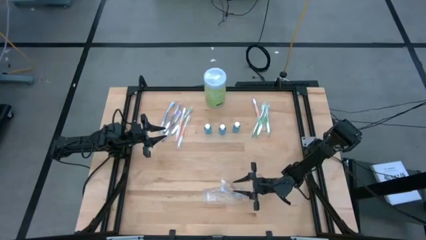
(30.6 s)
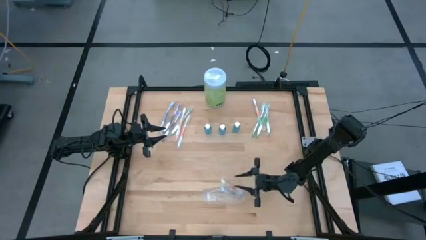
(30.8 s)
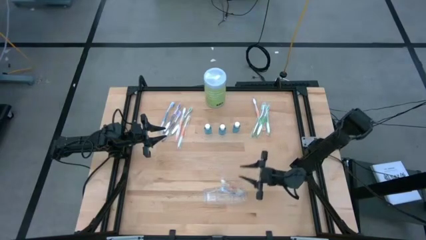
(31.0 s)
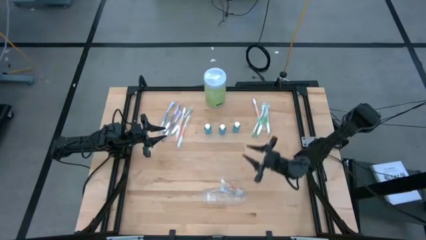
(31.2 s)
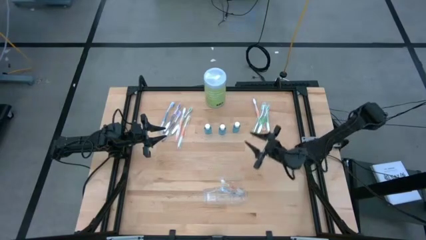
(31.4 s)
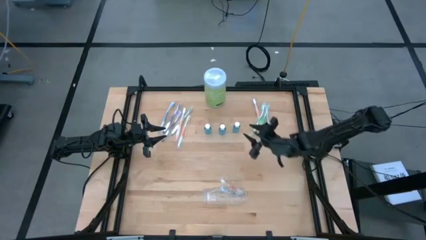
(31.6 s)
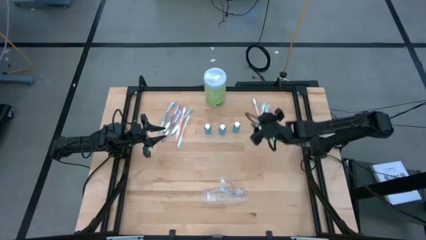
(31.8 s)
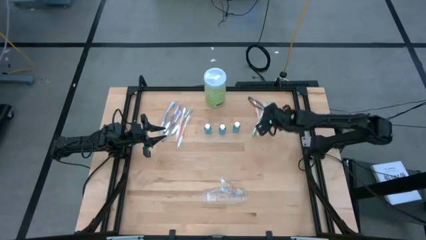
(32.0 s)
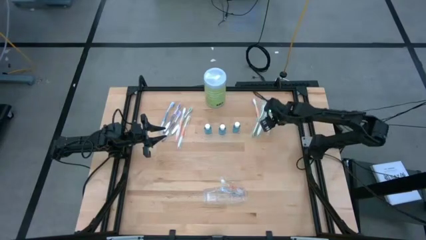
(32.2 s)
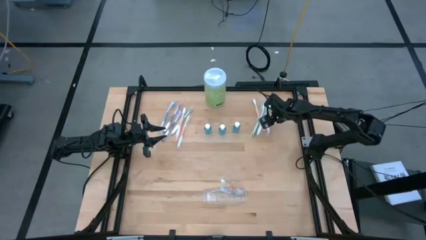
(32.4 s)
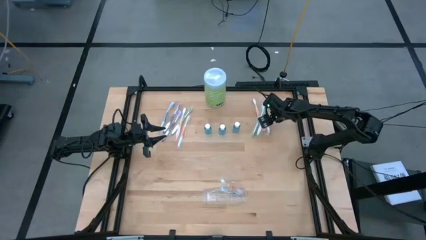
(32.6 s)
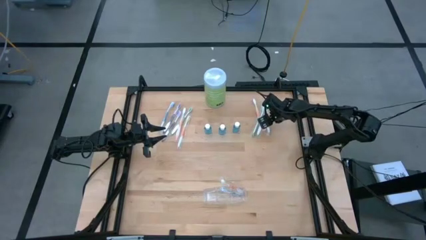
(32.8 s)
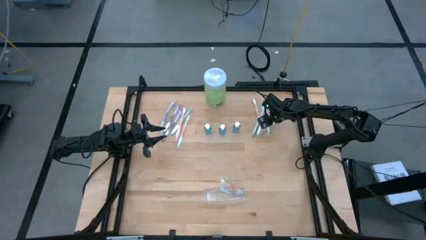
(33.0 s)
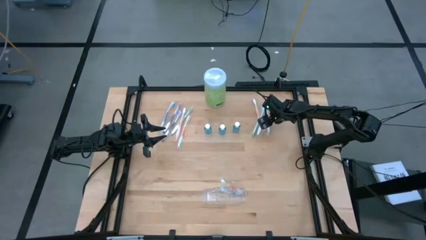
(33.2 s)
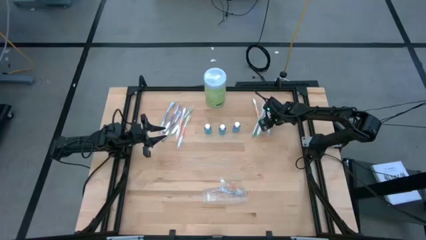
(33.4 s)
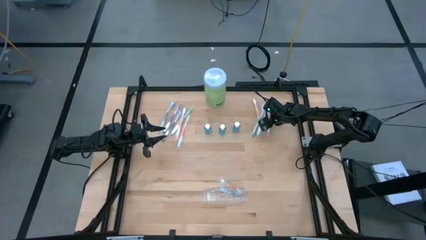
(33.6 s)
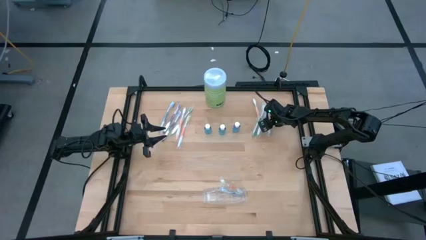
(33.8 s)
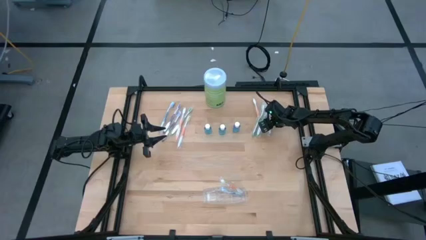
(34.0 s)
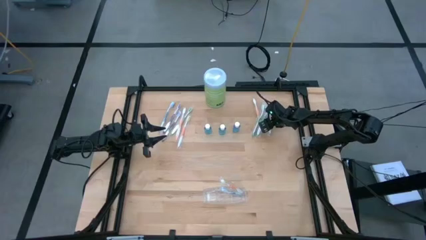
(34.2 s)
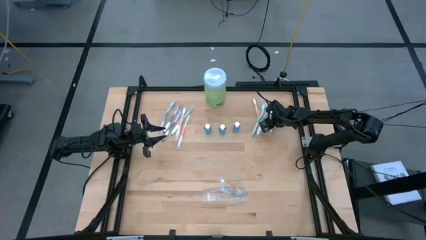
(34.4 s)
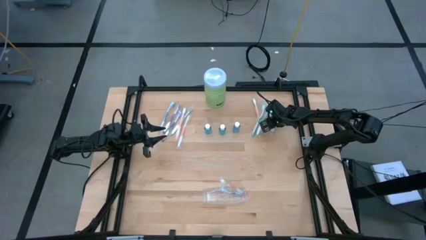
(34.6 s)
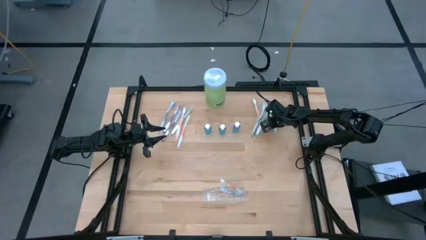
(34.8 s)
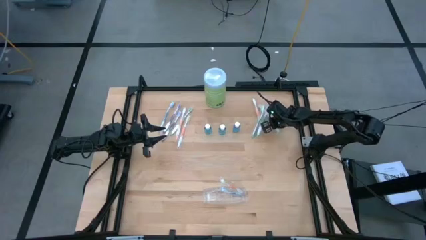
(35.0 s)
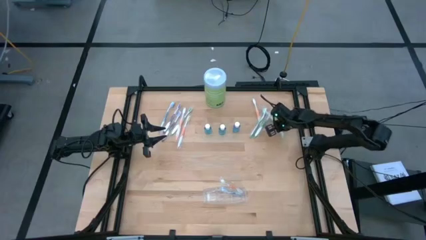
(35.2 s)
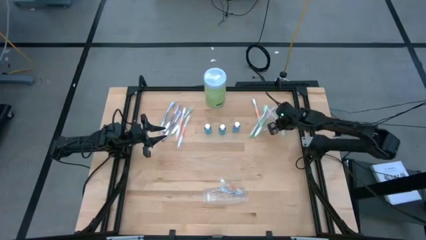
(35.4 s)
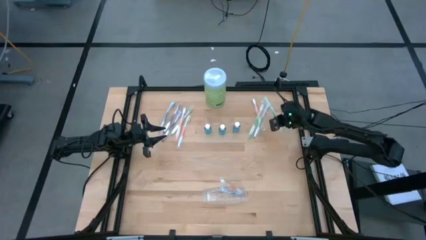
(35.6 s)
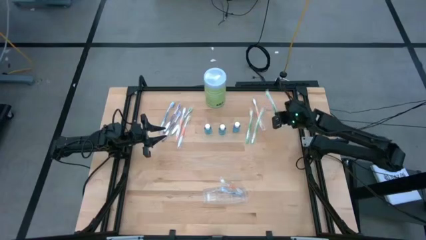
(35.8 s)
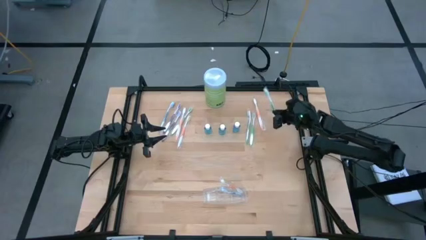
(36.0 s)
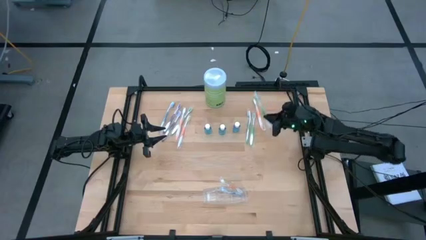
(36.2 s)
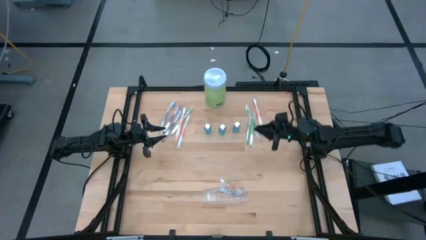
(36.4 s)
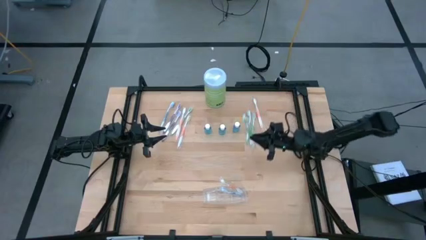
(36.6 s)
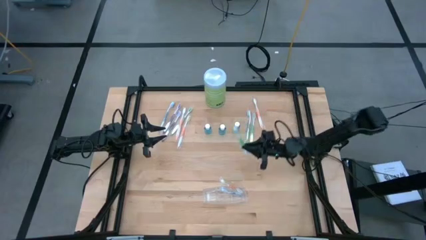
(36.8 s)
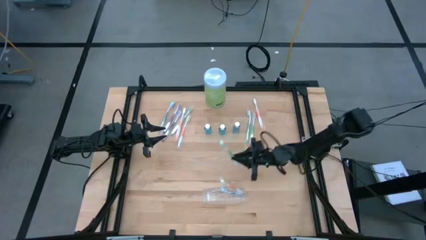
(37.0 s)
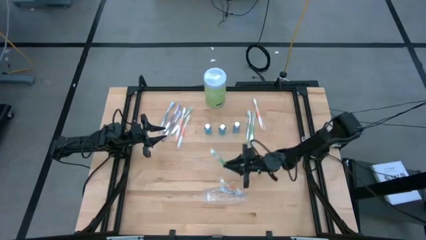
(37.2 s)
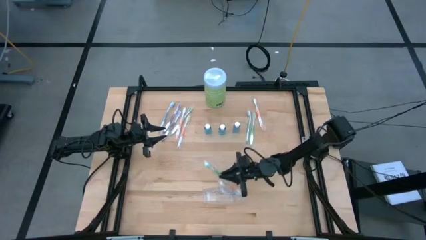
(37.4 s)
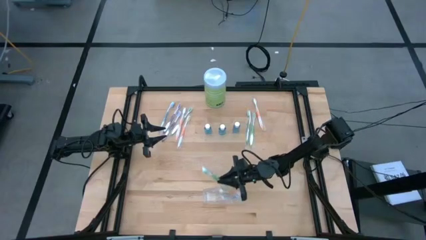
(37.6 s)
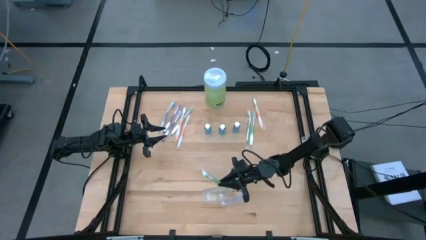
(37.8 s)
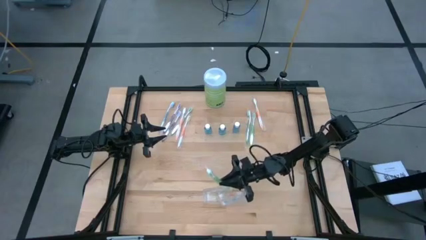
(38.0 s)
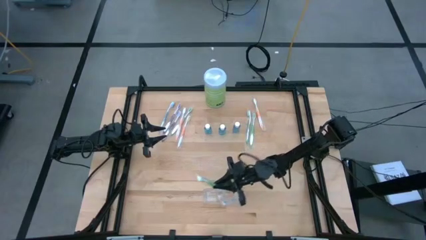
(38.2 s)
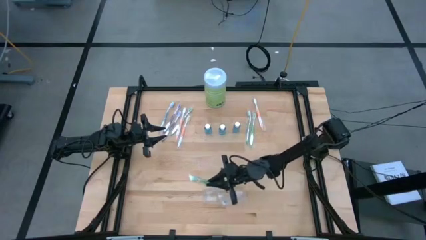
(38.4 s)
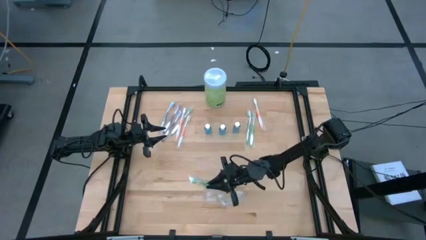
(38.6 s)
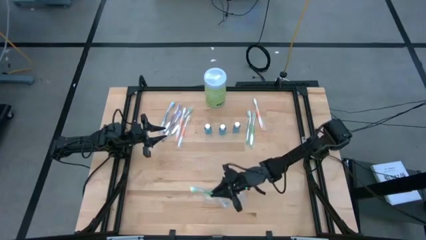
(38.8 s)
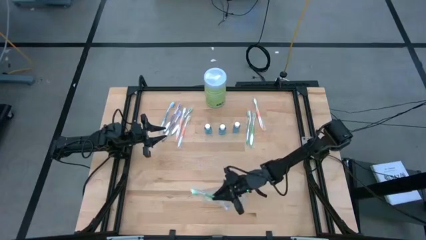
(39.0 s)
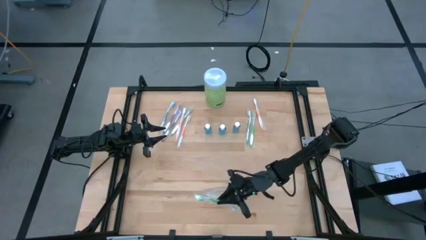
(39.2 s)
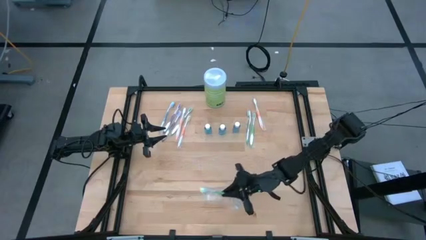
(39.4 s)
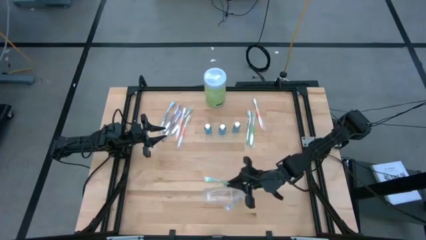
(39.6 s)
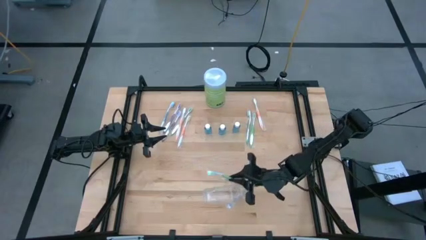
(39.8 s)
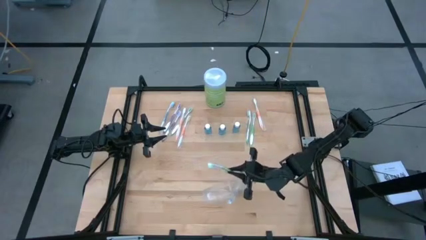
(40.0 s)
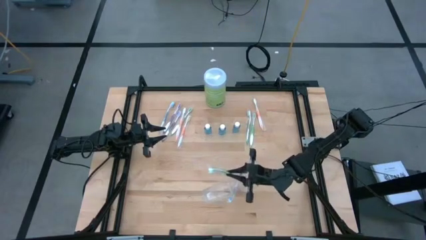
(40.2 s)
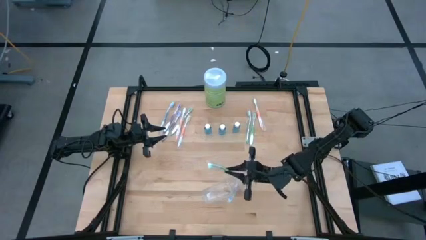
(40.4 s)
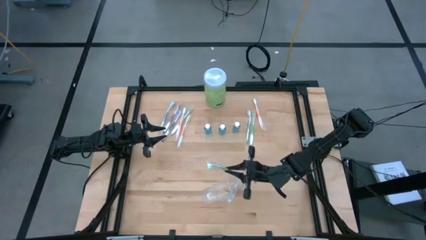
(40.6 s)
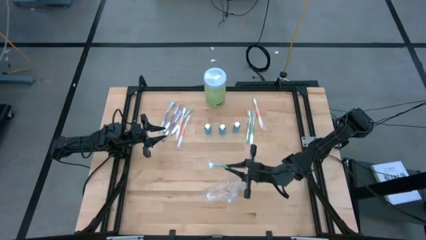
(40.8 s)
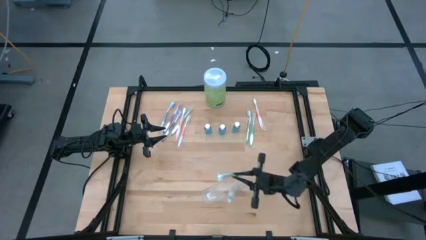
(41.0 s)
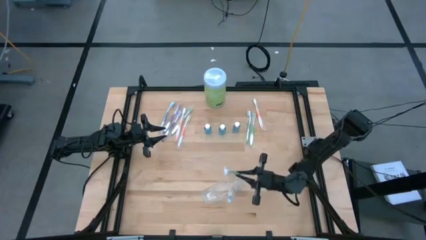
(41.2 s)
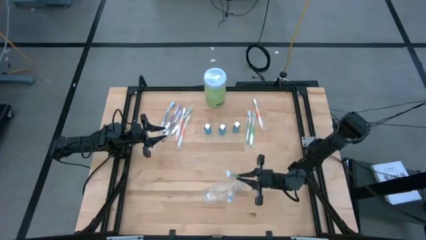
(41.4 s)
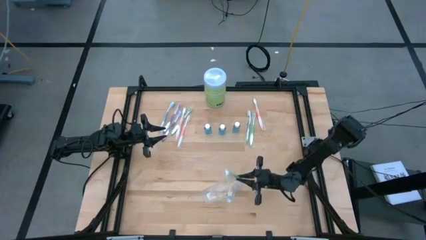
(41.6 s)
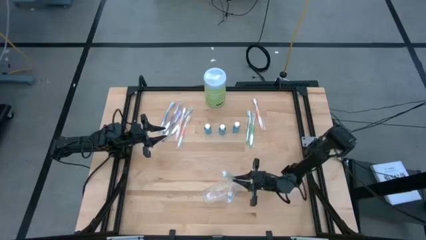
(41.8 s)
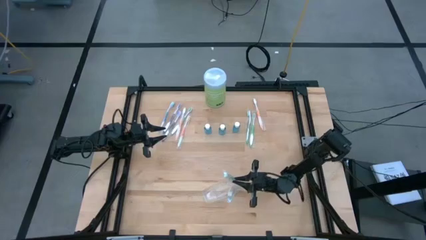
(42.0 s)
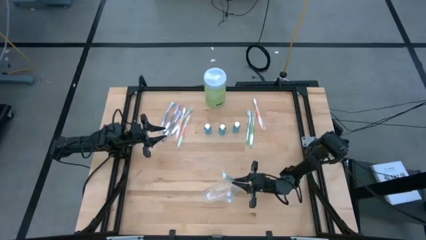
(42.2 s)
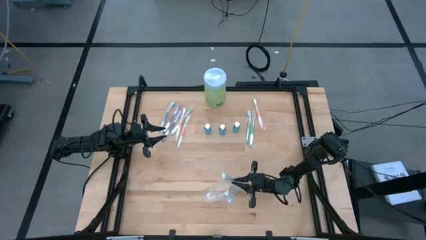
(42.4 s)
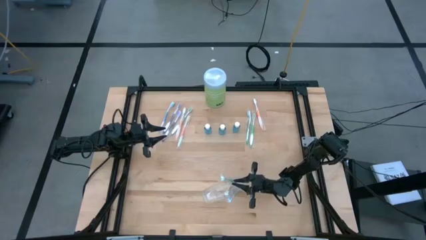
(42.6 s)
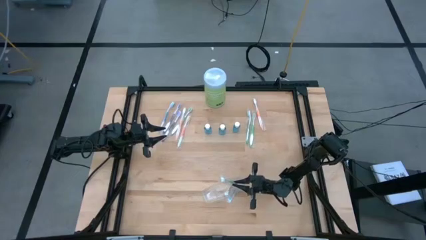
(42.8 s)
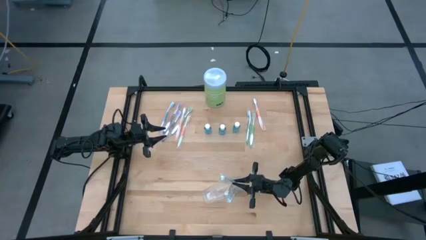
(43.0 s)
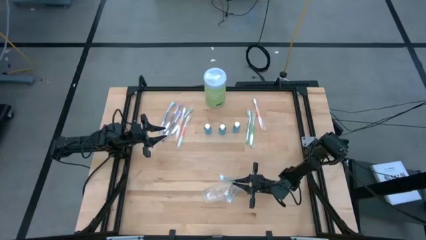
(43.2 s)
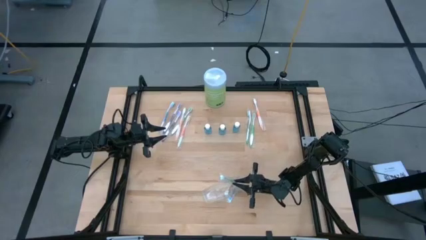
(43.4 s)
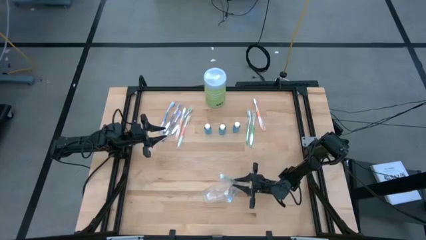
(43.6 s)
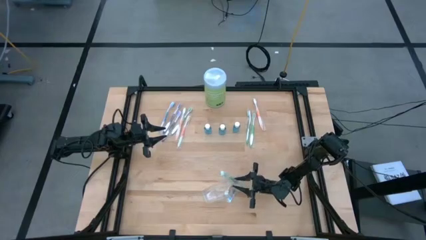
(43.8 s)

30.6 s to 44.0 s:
Task: Pick & Place toothbrushing station
Put the green toothbrush into the transparent organizer

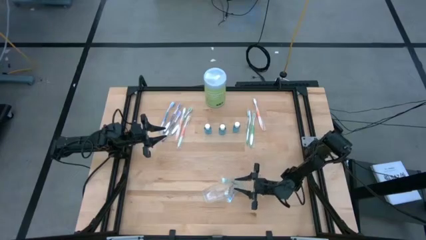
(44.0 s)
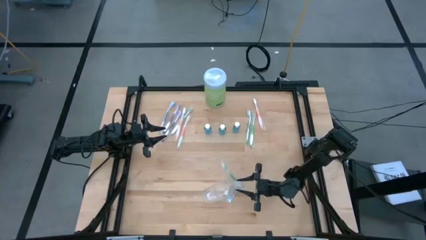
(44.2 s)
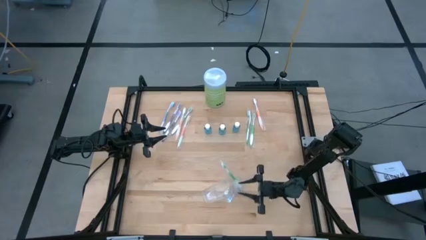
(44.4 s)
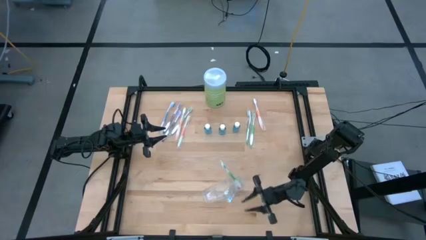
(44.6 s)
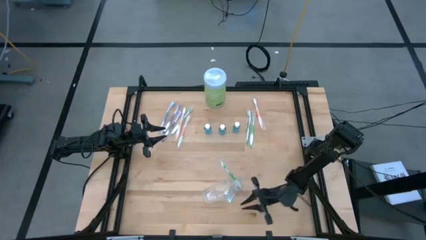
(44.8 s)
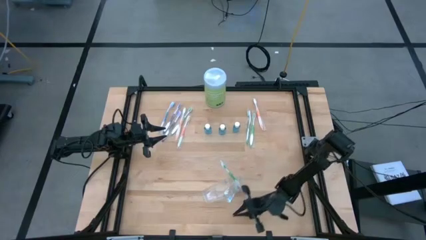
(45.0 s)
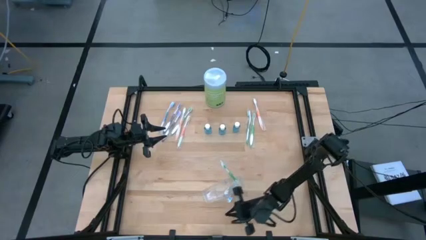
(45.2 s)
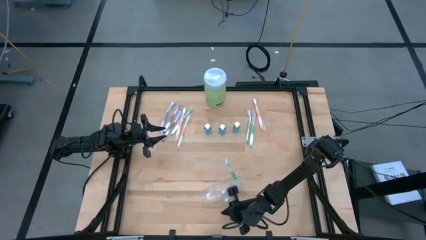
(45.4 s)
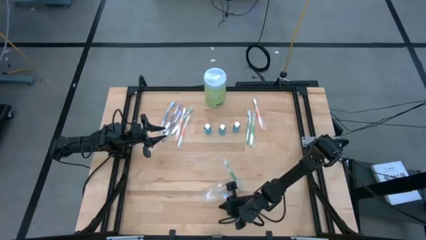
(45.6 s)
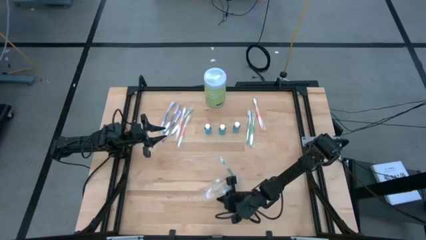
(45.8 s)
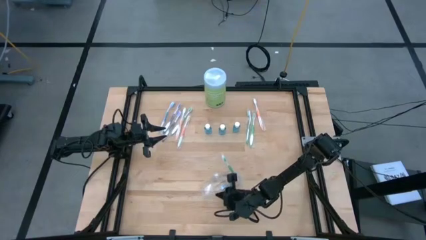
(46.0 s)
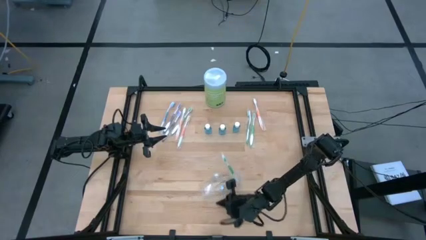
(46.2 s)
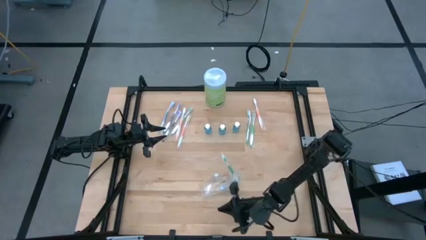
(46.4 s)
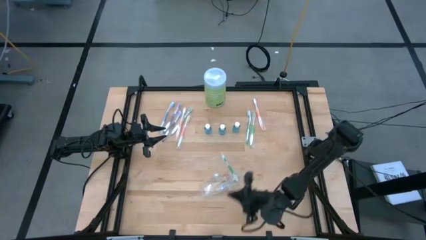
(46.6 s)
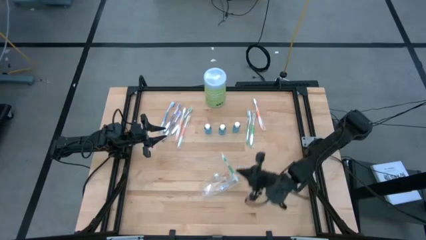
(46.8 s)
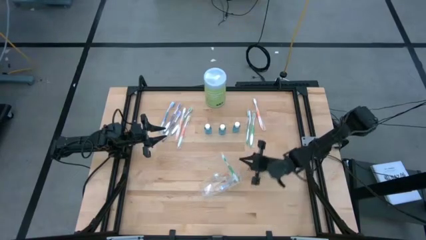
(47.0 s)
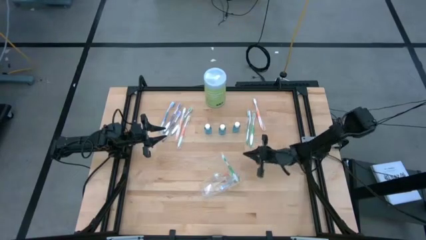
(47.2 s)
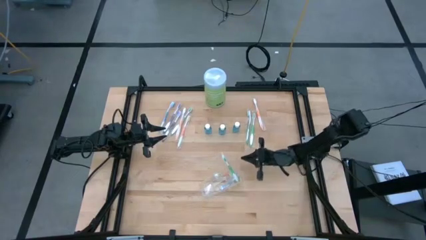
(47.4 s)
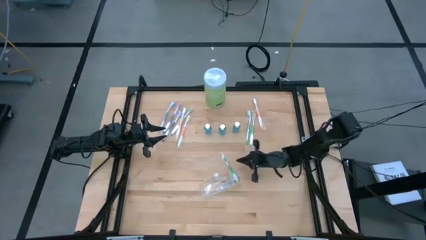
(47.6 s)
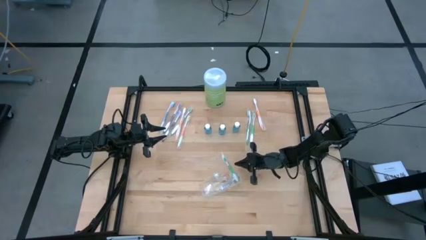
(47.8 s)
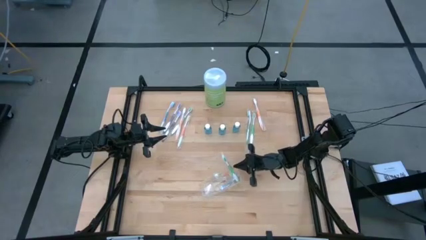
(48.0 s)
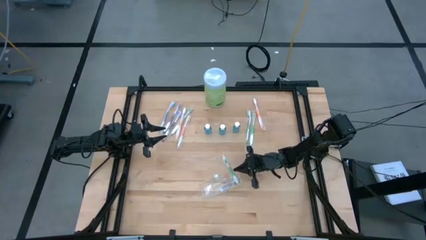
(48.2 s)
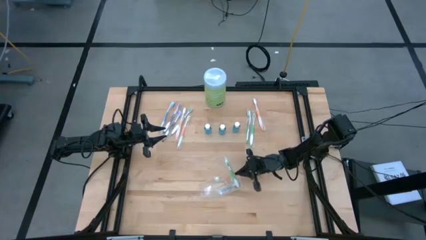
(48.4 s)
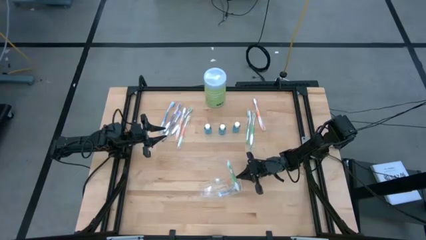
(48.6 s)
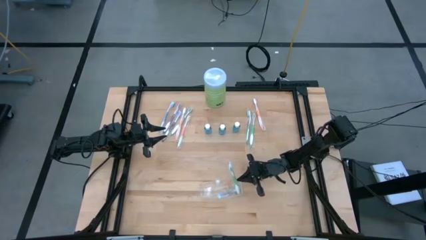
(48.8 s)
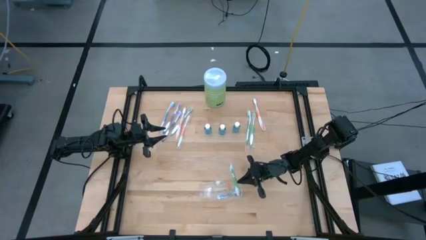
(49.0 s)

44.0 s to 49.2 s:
Adjust the transparent organizer
